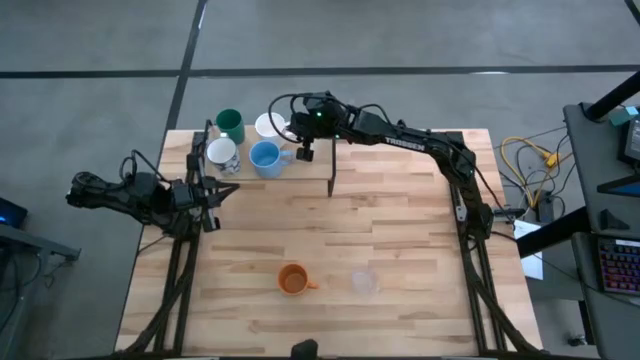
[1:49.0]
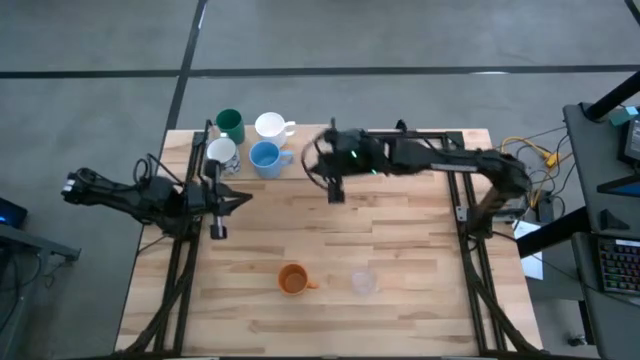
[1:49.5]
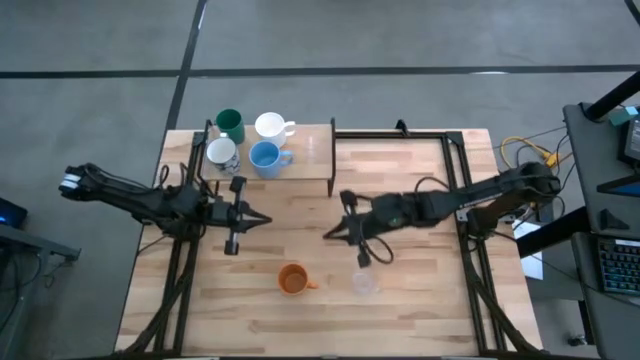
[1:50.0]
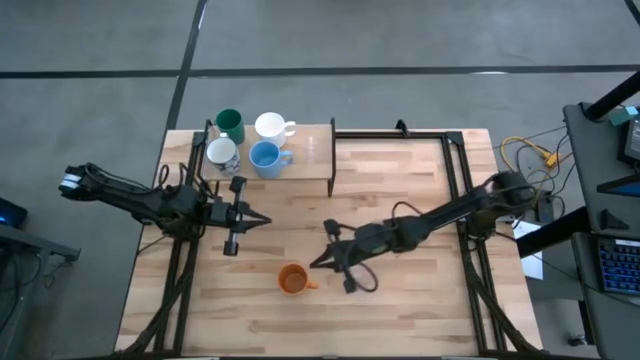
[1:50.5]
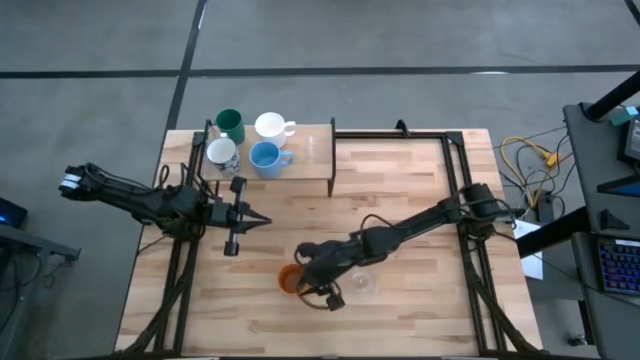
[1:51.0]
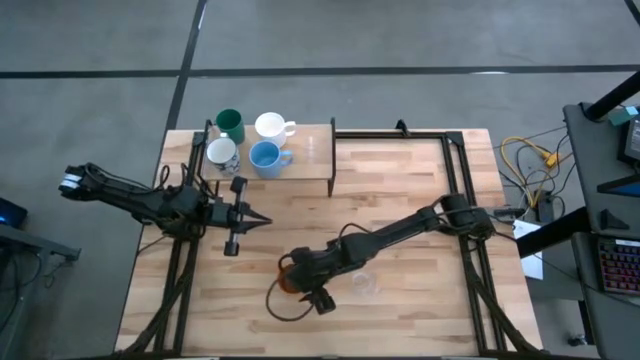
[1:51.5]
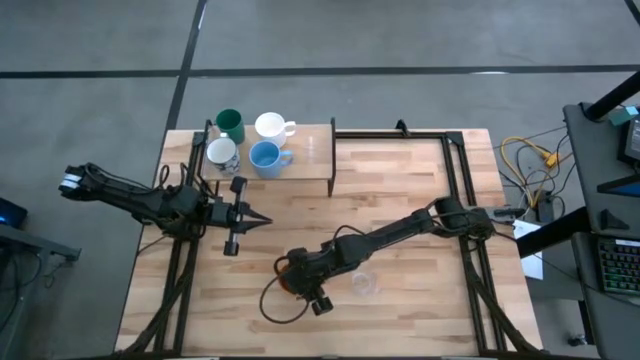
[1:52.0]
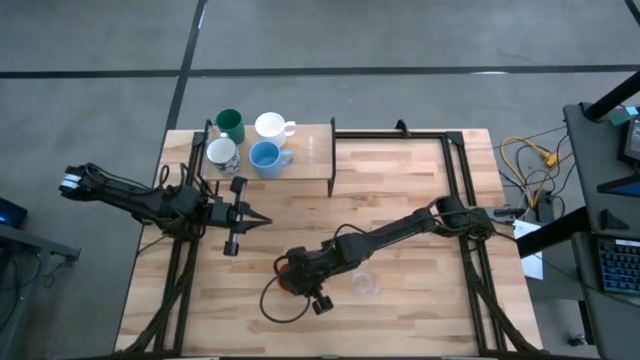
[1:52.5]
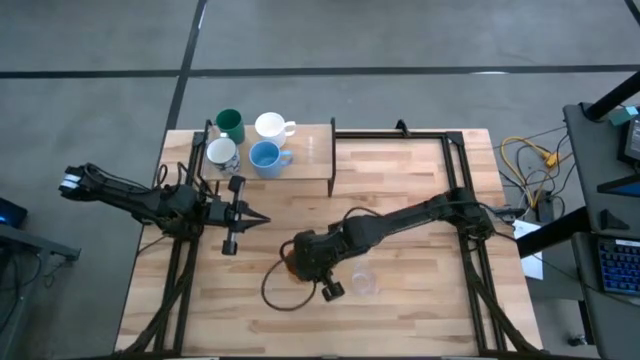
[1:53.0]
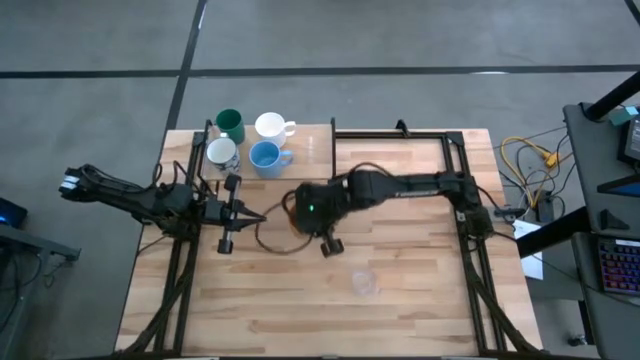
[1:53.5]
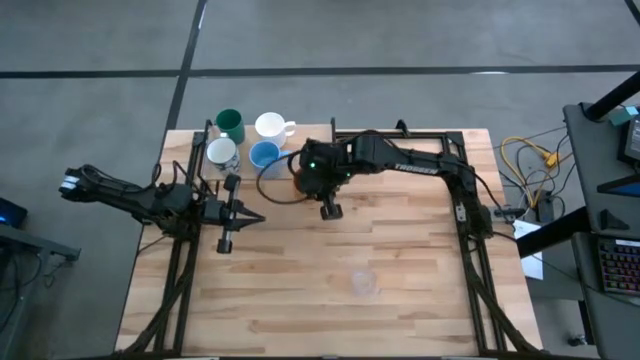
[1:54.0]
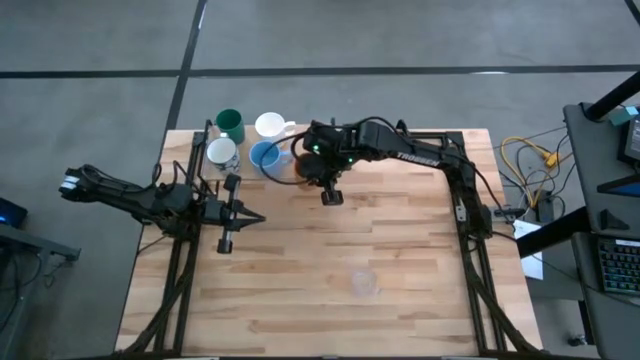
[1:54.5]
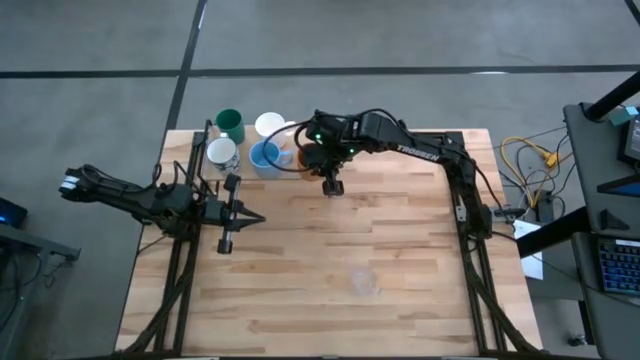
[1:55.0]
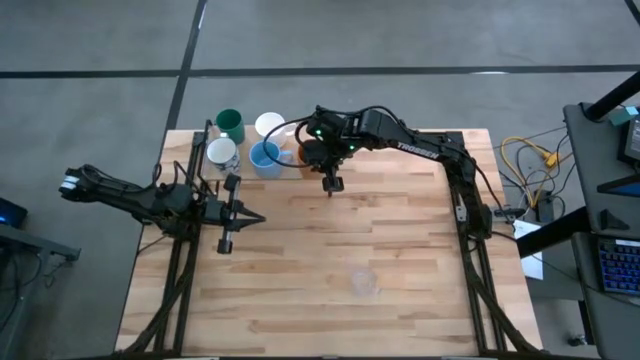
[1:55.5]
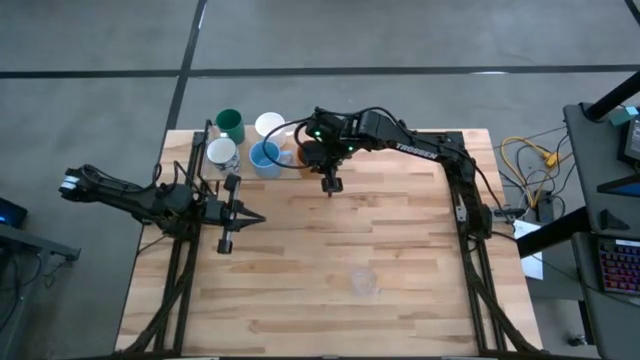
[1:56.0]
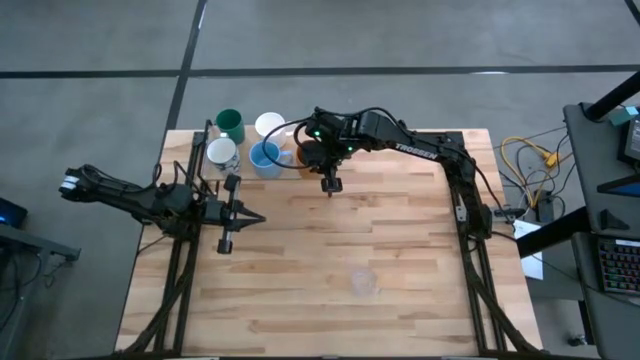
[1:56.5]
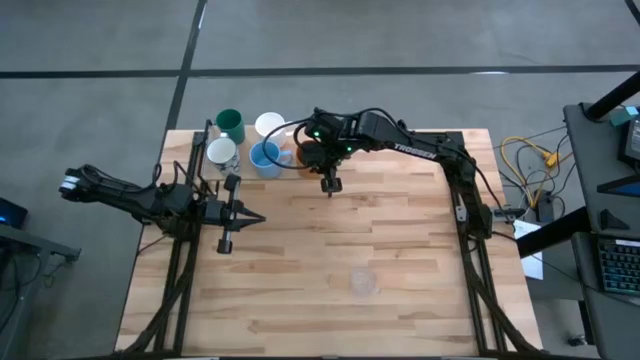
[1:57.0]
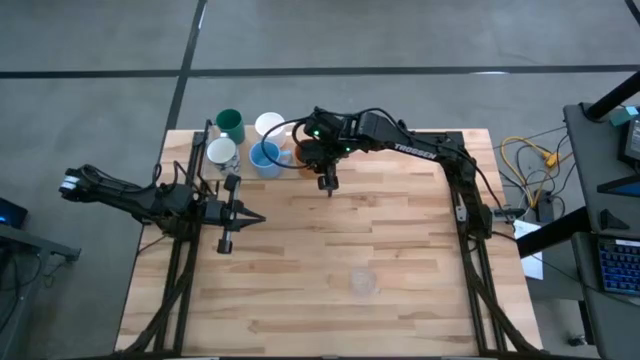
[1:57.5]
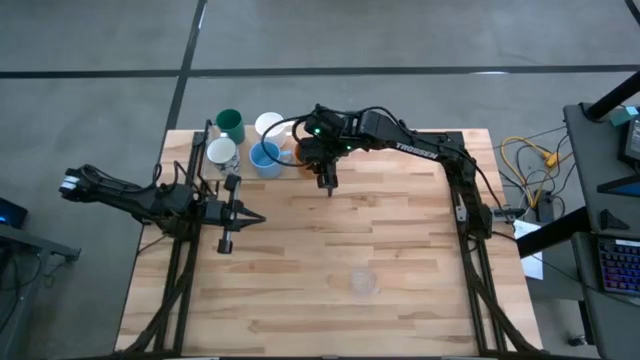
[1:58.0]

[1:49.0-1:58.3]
Task: Stack small to large cups/mugs on shelf
Put the orange mug on the shelf

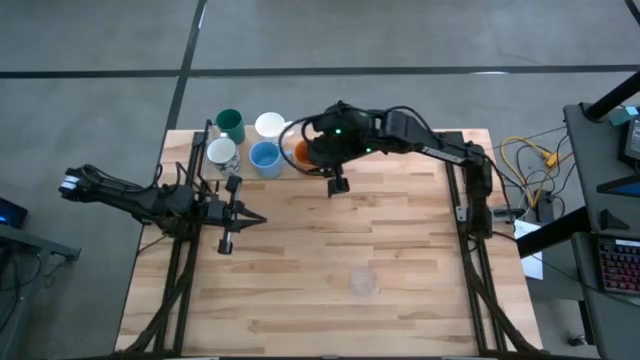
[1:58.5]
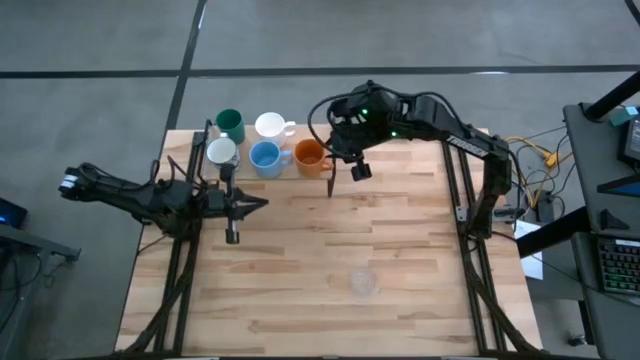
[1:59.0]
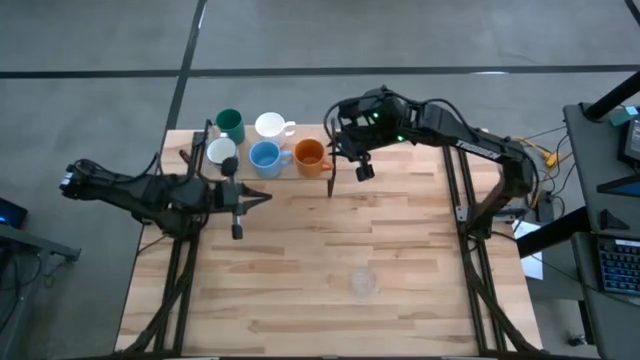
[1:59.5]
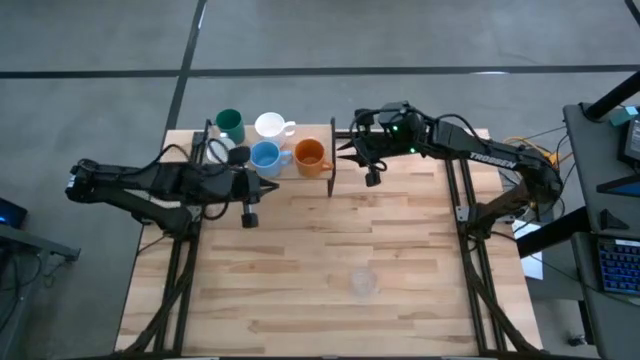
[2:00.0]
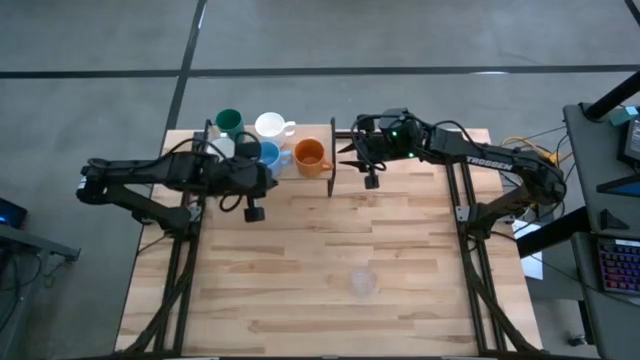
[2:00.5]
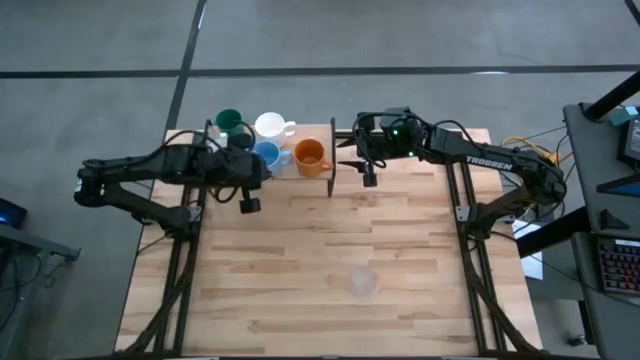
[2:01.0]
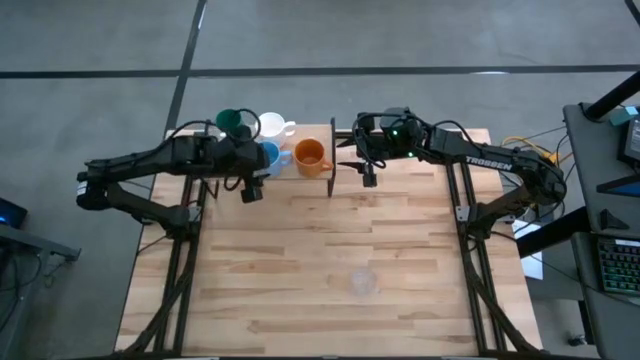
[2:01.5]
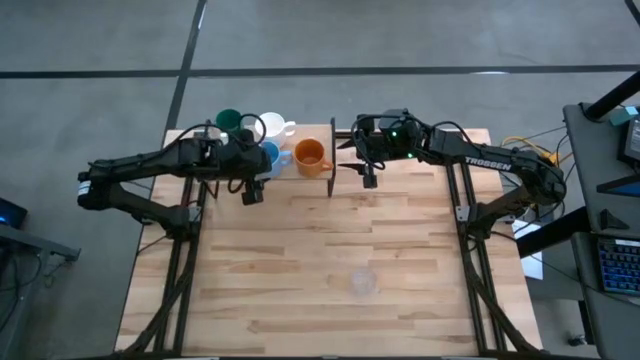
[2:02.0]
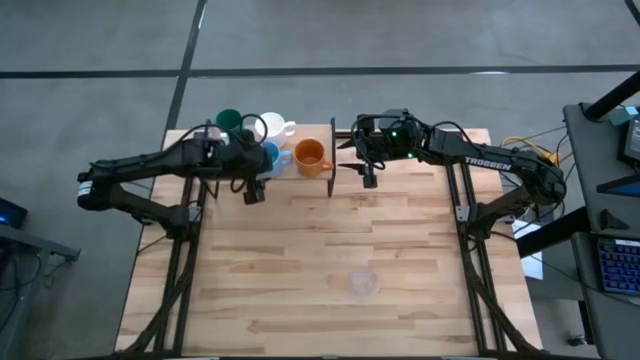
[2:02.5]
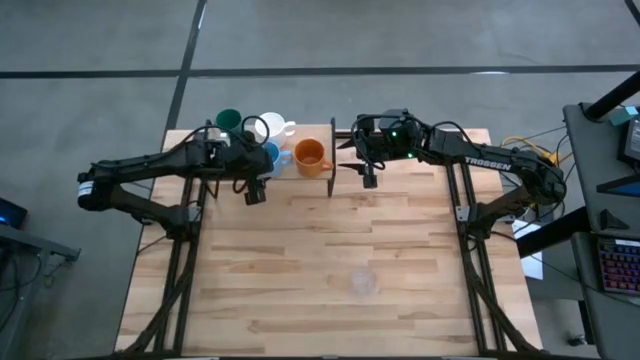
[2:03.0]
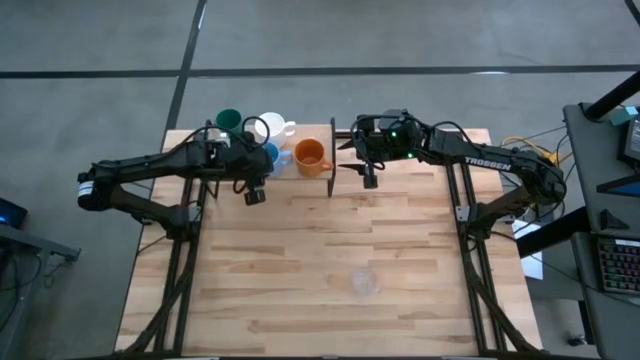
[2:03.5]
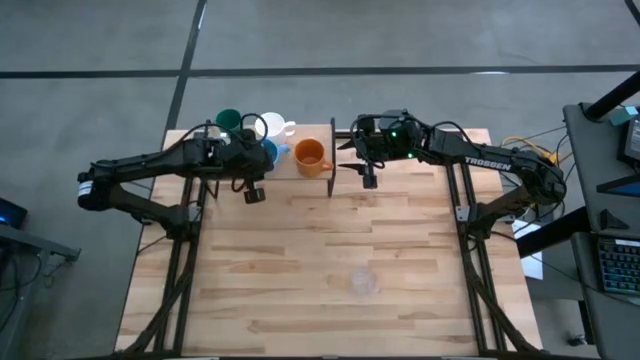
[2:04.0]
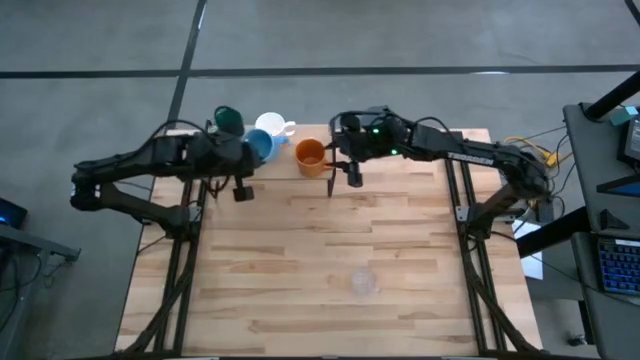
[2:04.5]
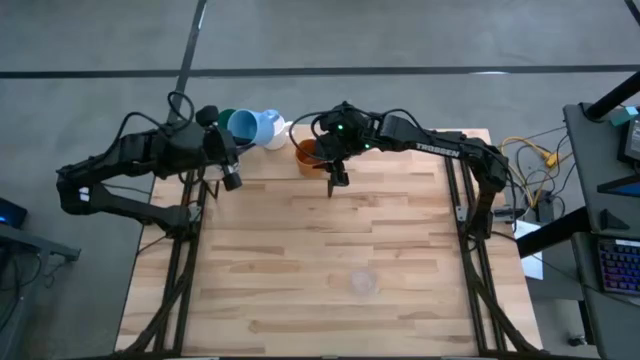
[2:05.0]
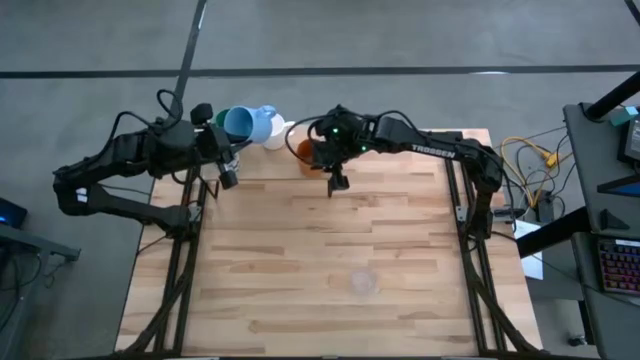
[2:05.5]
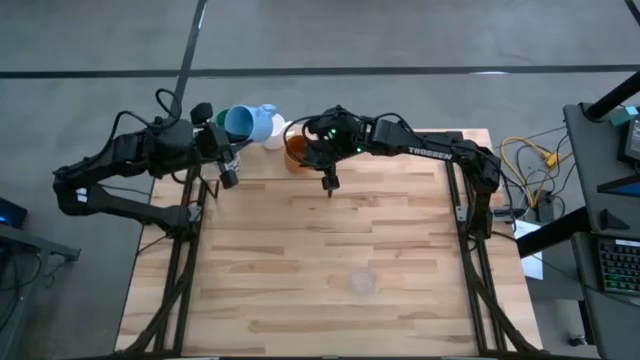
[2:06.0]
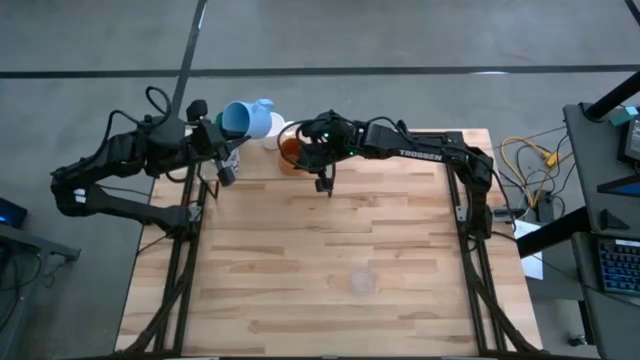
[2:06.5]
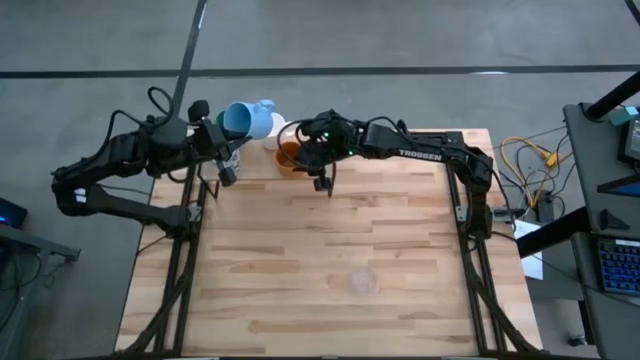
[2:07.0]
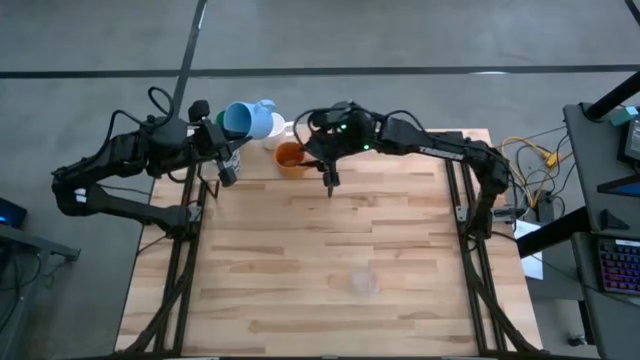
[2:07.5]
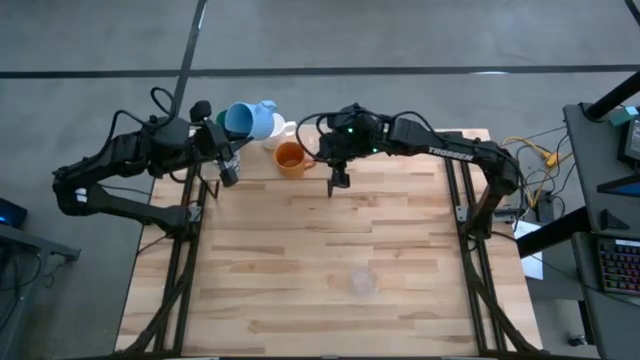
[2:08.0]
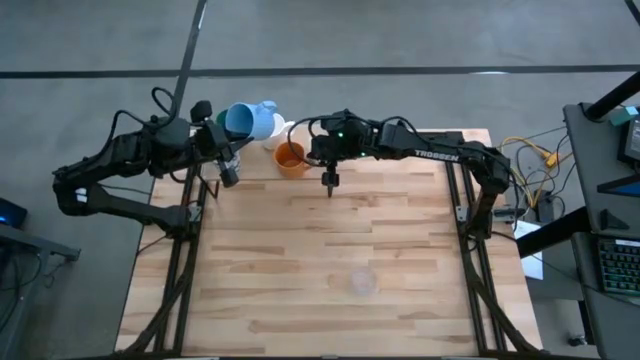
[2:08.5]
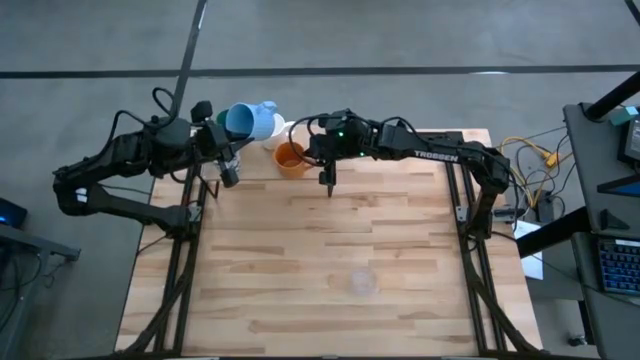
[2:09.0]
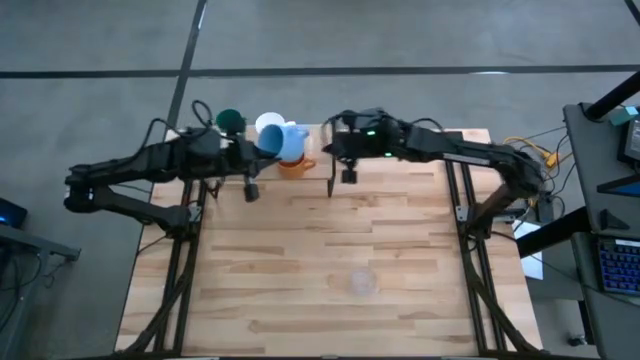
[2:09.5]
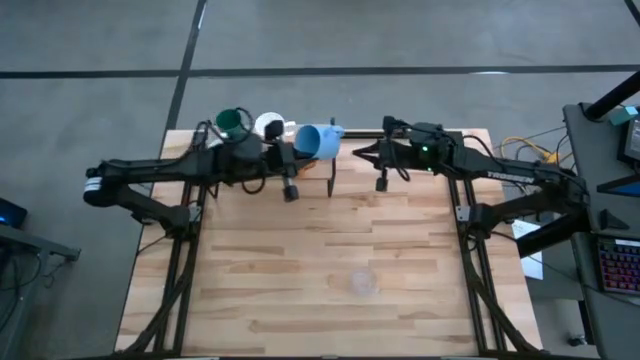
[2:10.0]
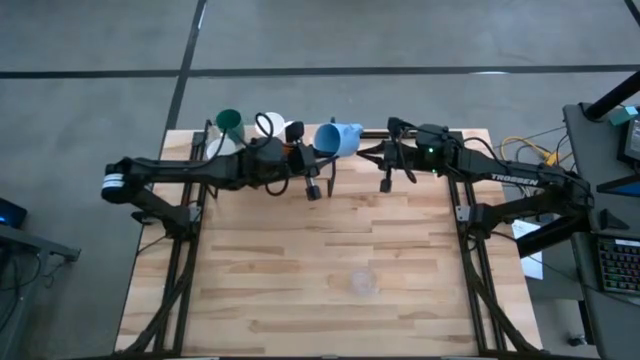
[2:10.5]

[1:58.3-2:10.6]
Adjust the orange mug and the light blue mug
